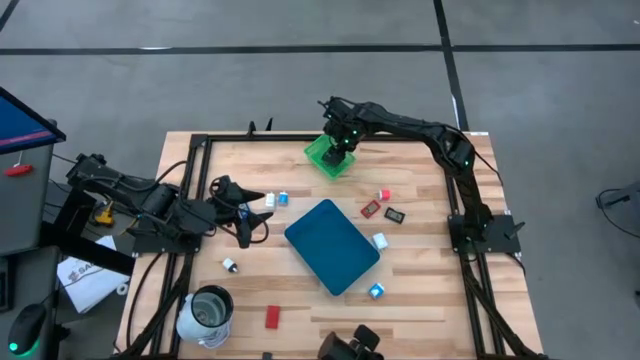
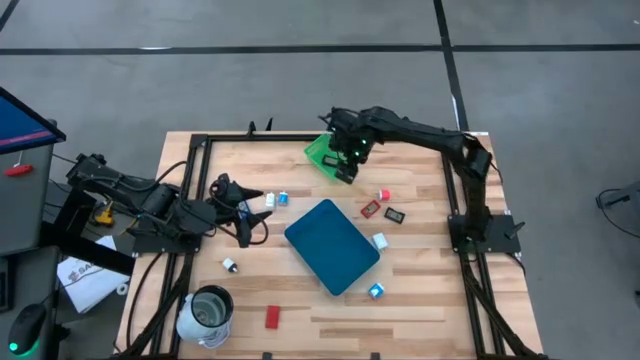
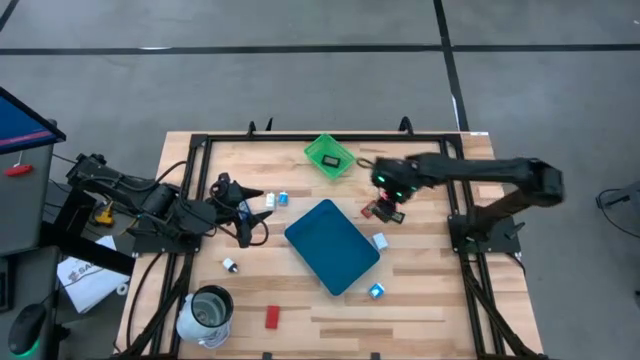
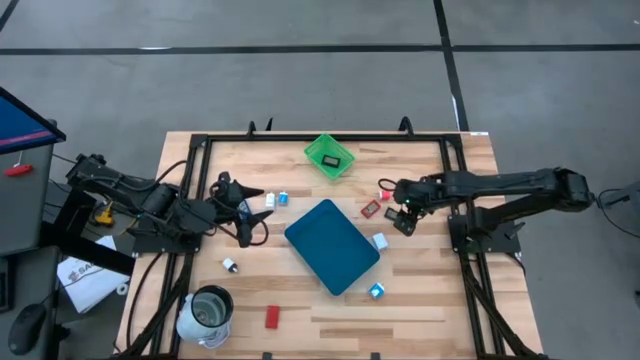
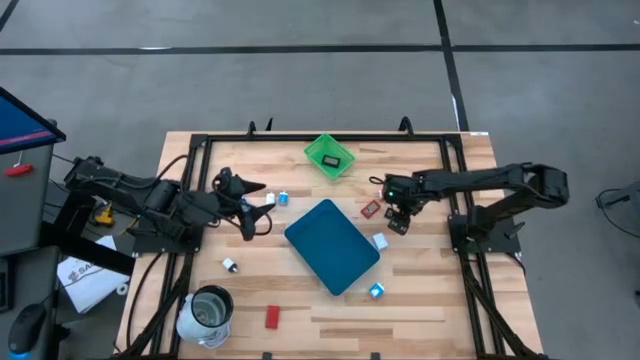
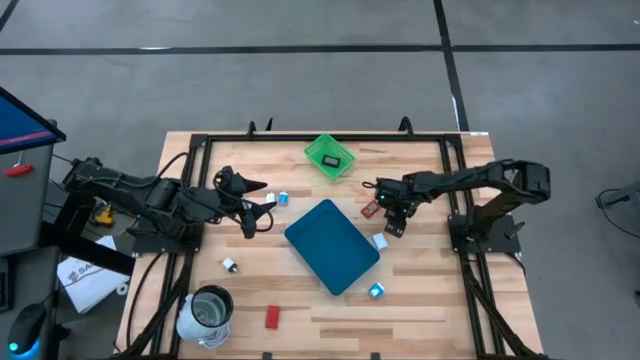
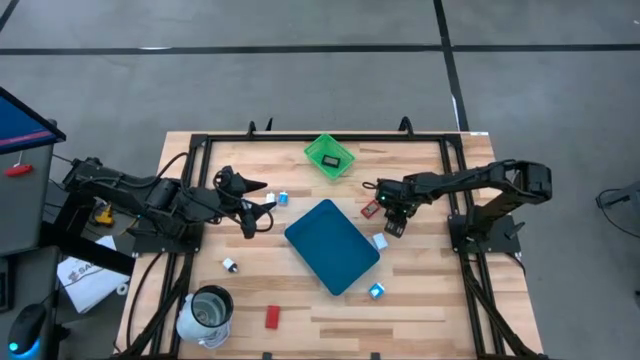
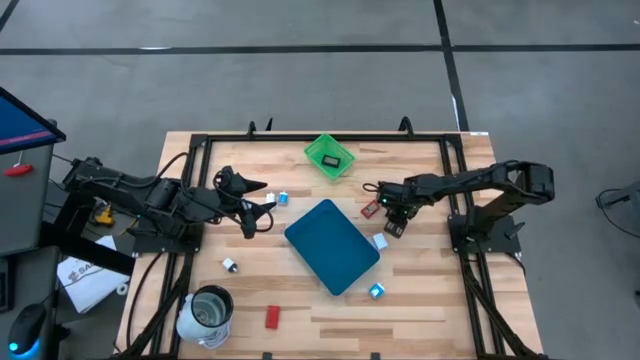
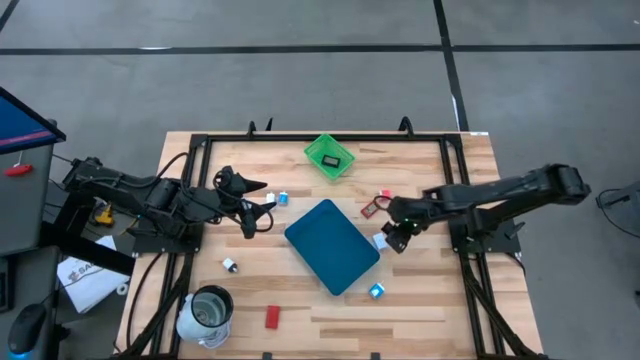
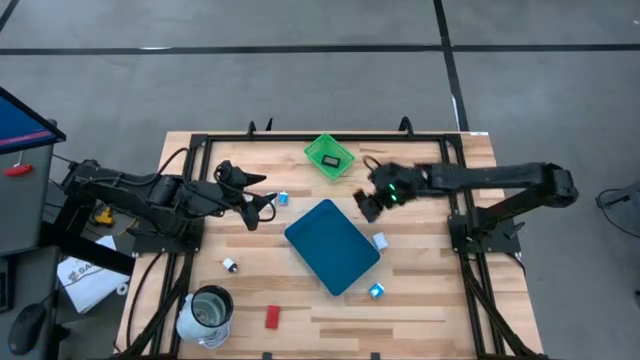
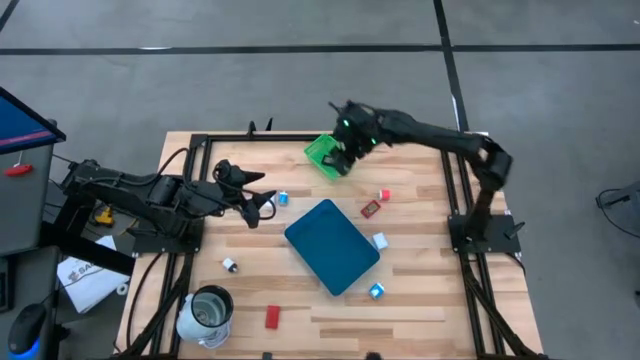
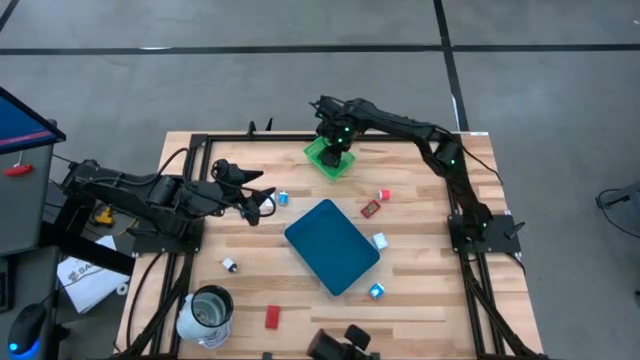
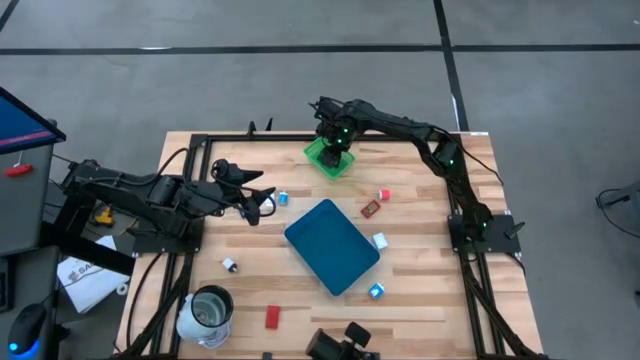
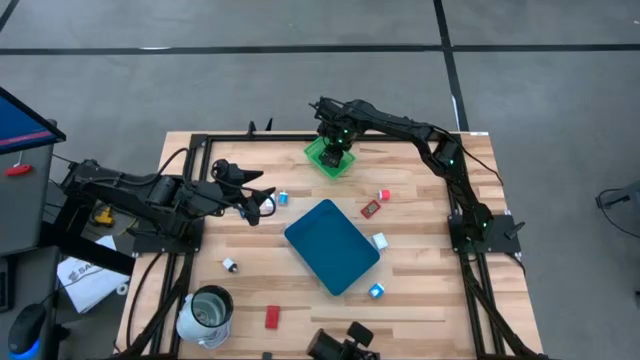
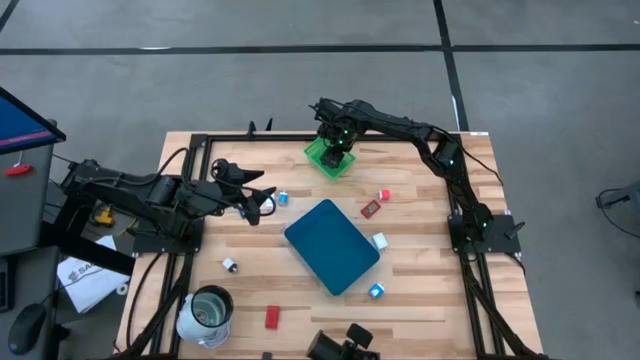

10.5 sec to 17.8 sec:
Task: Pick & Place Office items
Put the black digital timer into the green bin

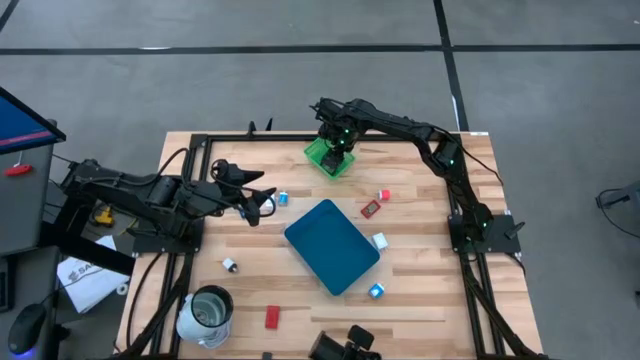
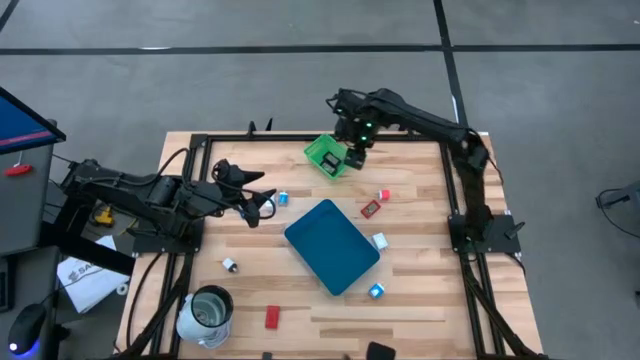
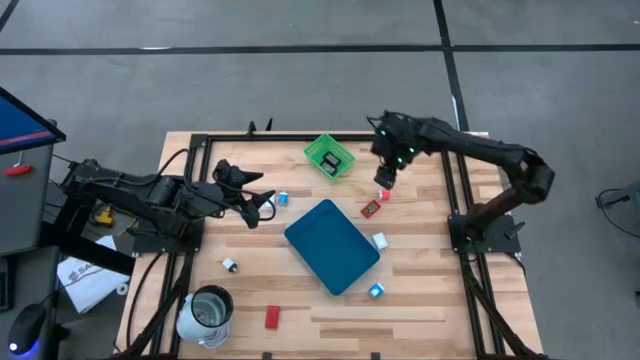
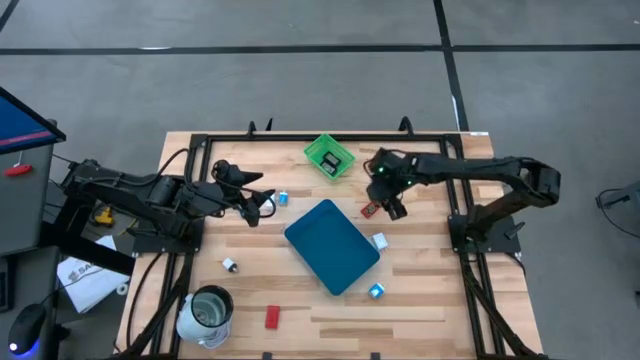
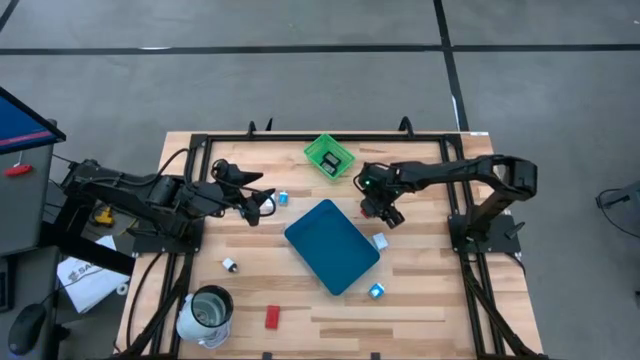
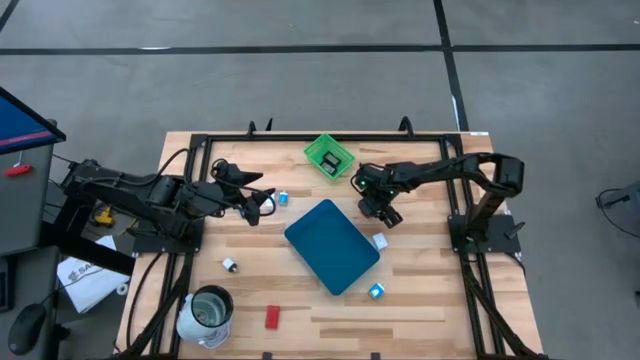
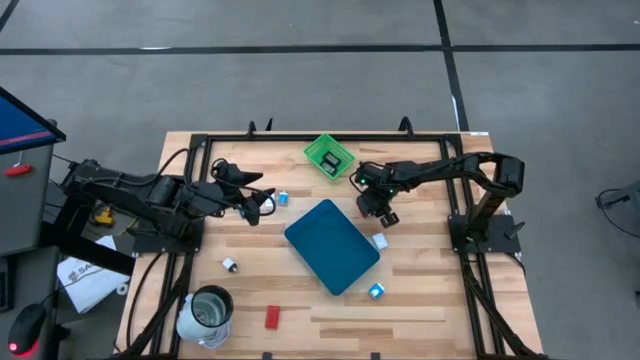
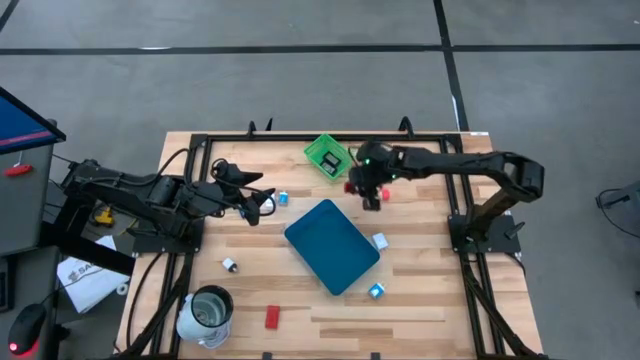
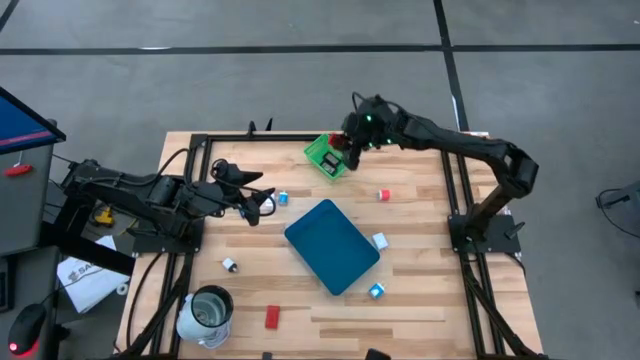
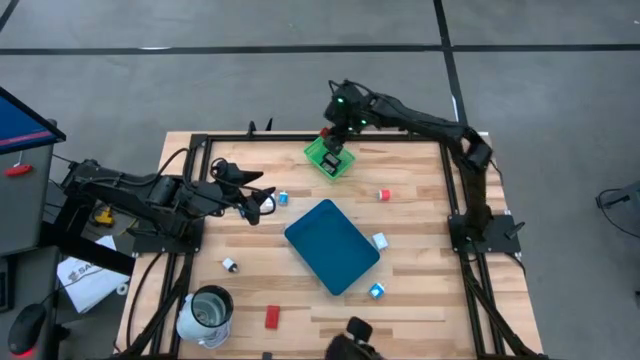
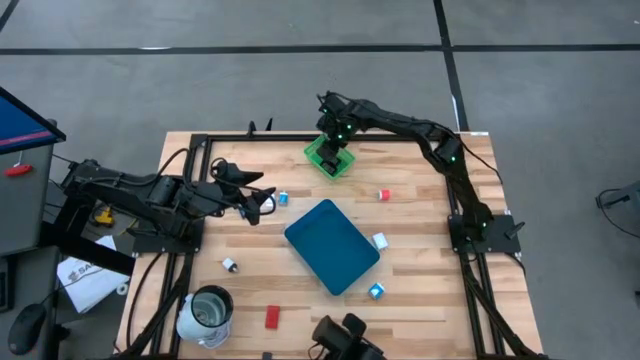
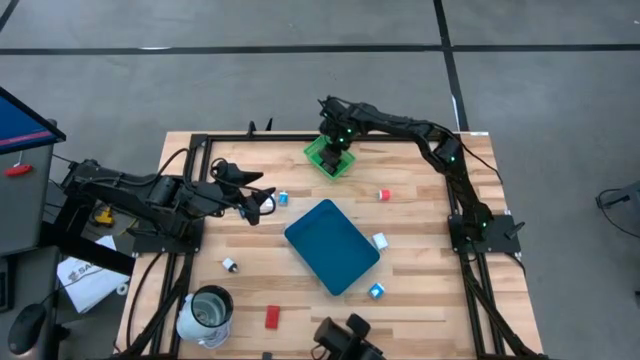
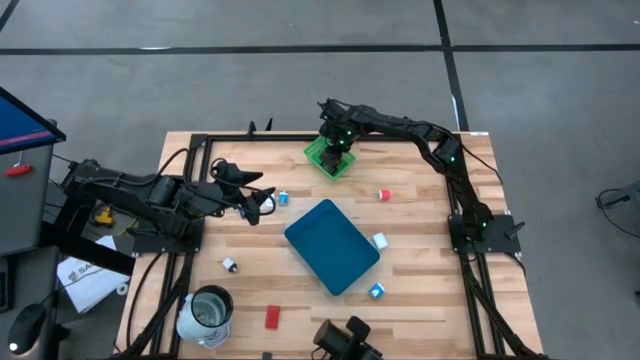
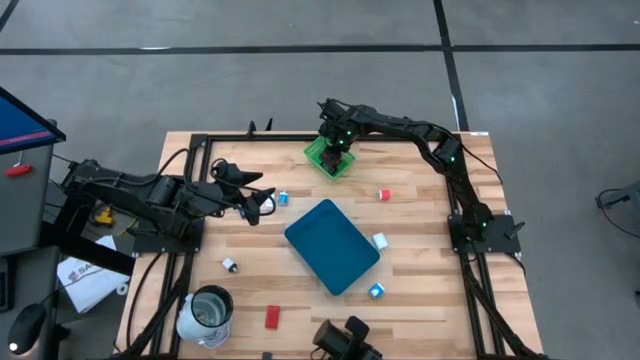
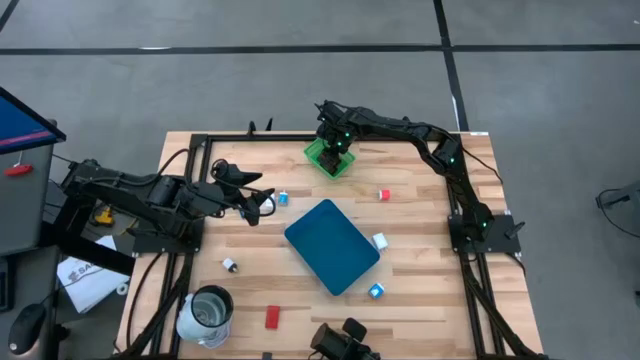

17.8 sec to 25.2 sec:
Put the top red digital timer into the green bin

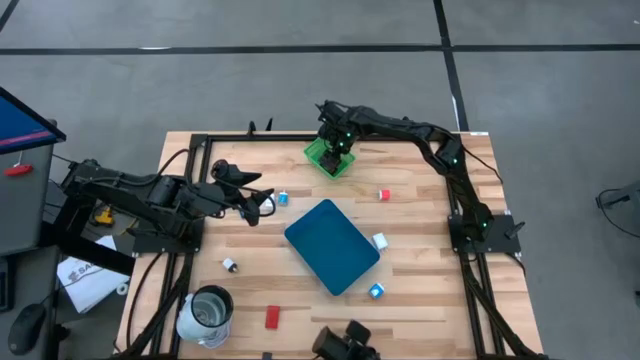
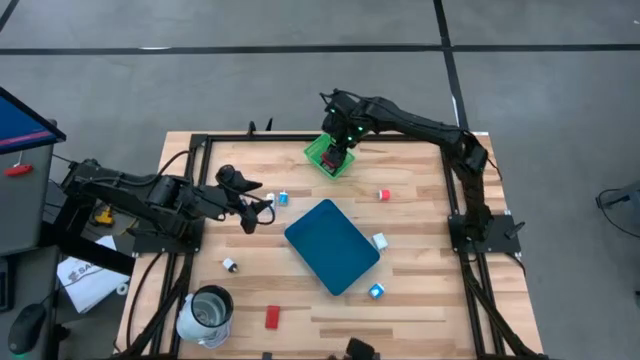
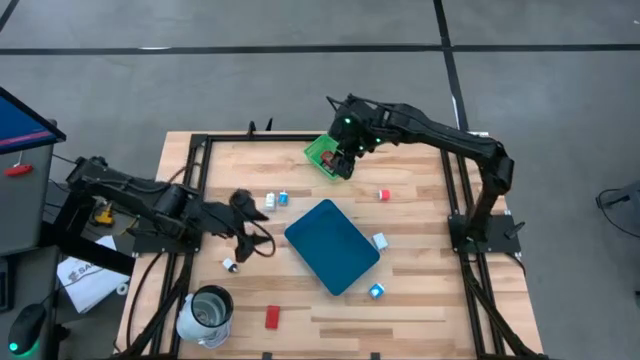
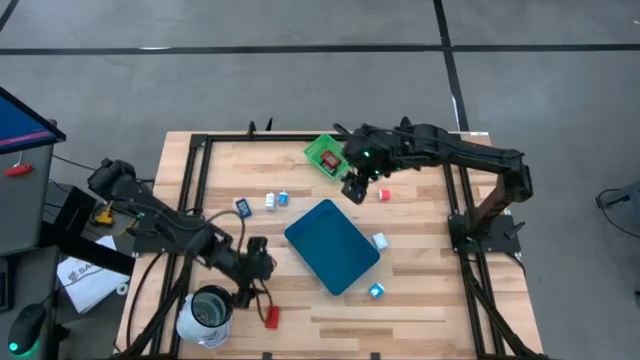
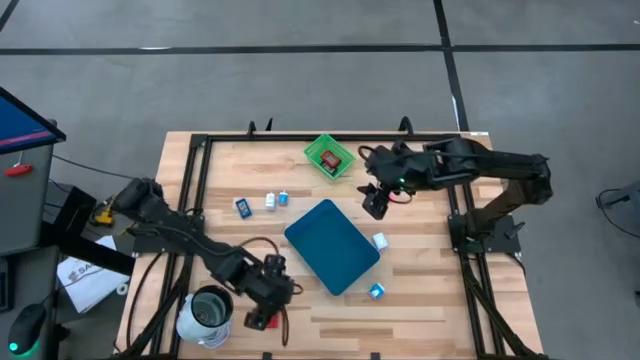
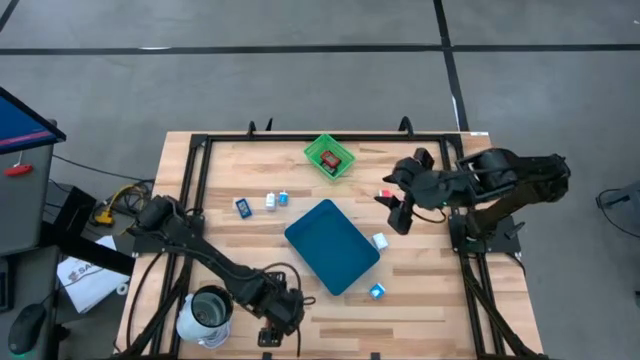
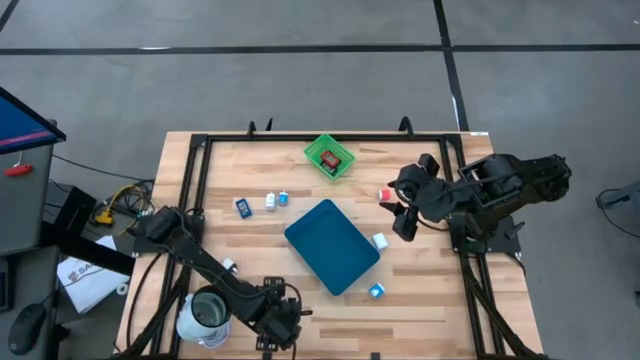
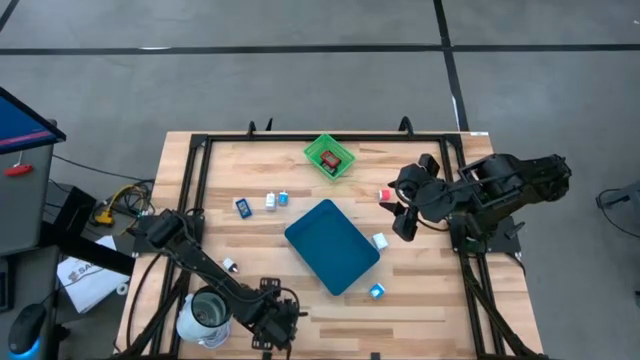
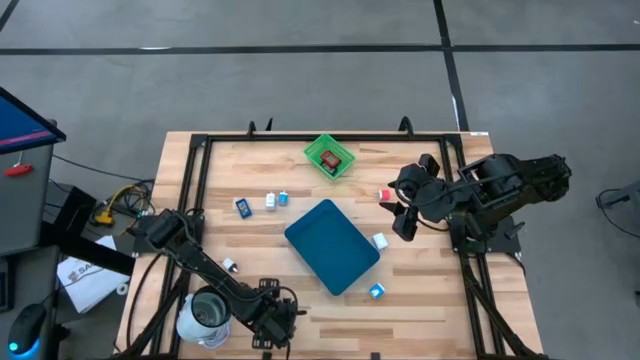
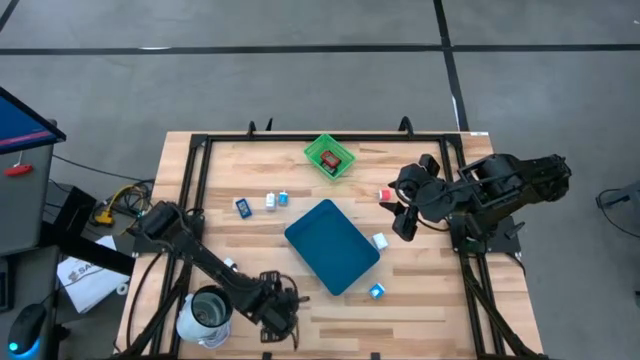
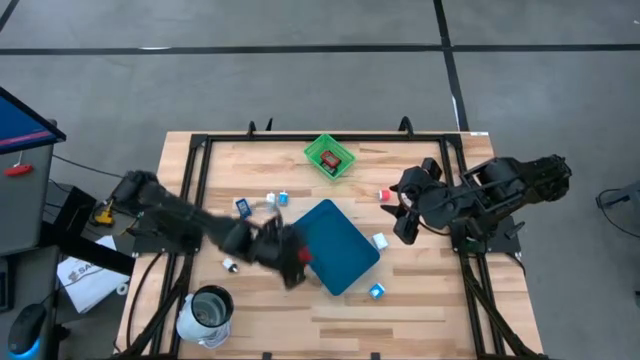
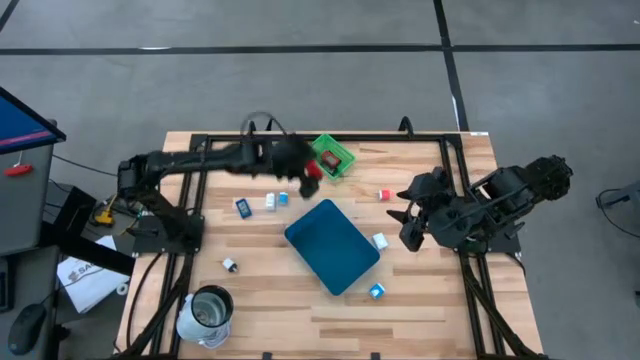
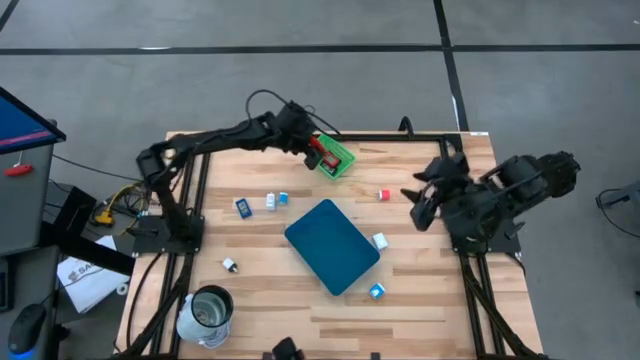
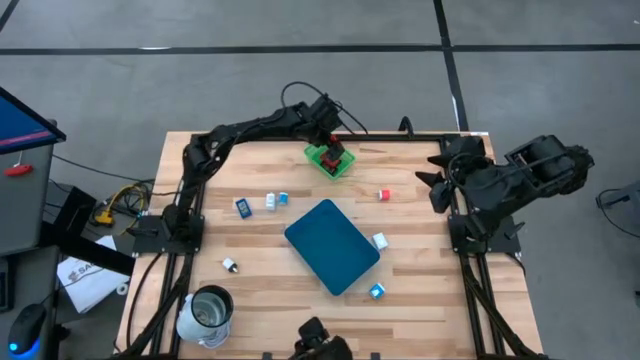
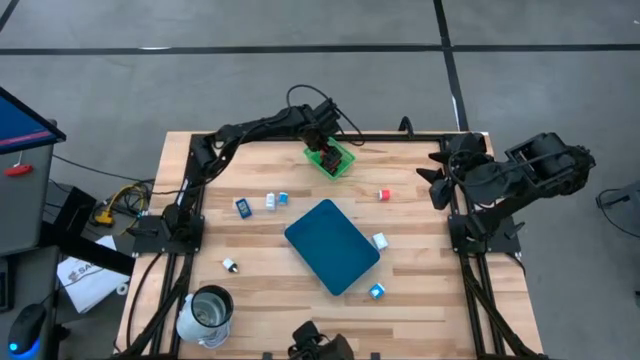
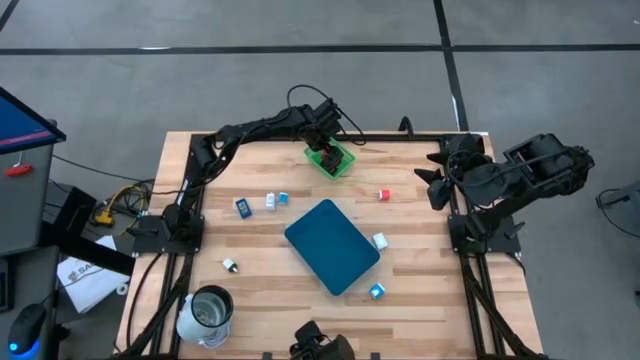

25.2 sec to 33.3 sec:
Put the red digital timer into the green bin
